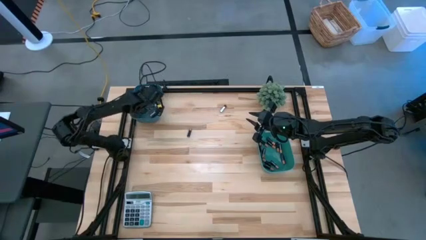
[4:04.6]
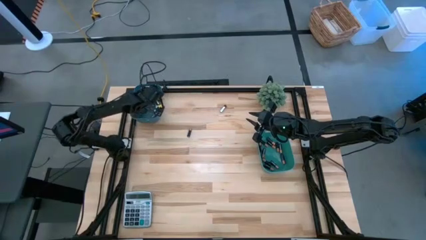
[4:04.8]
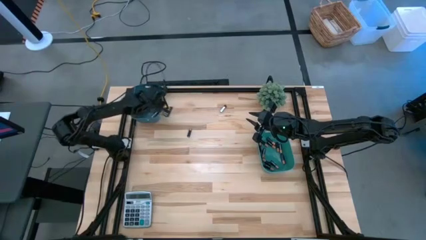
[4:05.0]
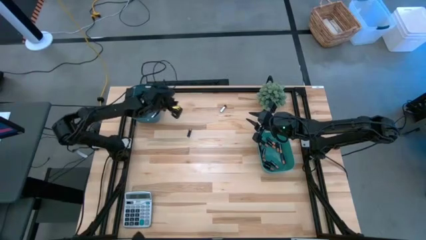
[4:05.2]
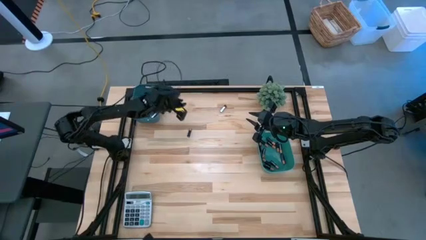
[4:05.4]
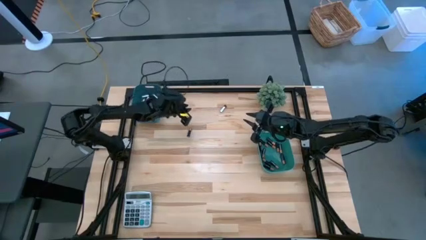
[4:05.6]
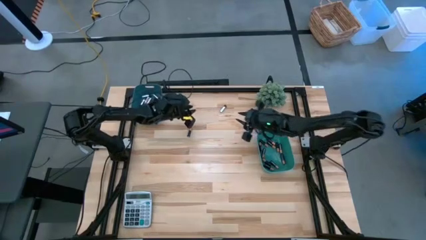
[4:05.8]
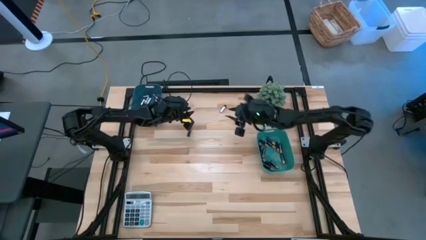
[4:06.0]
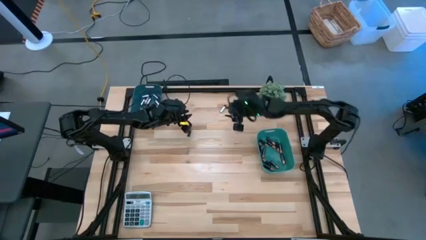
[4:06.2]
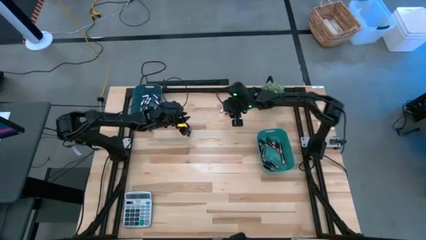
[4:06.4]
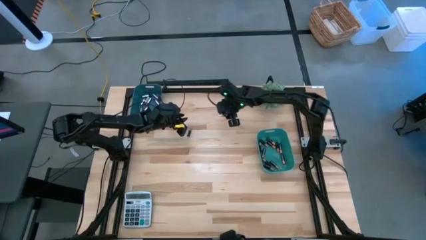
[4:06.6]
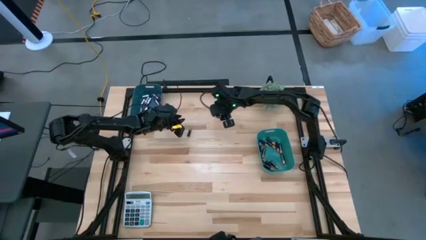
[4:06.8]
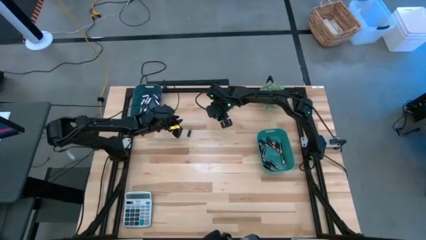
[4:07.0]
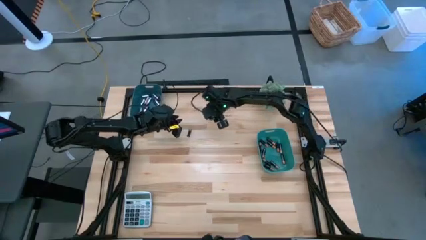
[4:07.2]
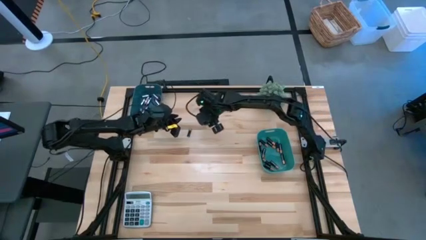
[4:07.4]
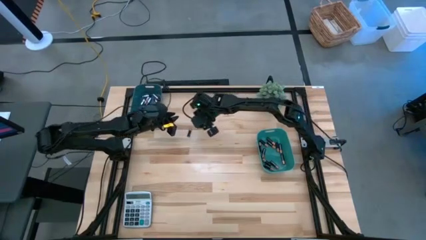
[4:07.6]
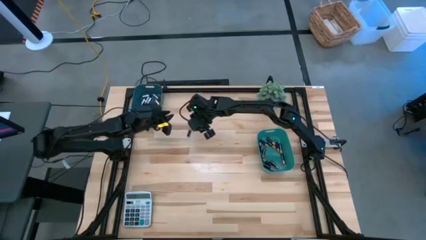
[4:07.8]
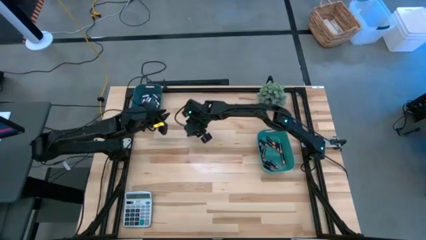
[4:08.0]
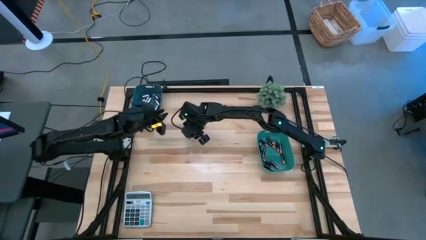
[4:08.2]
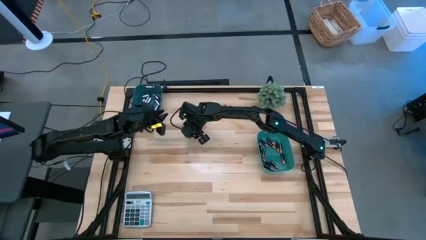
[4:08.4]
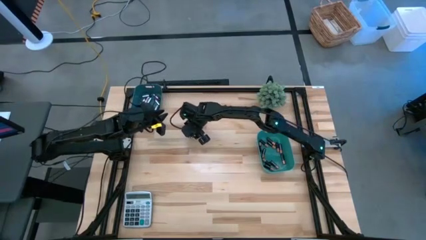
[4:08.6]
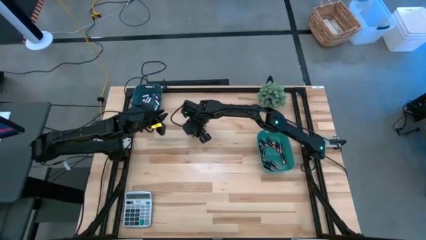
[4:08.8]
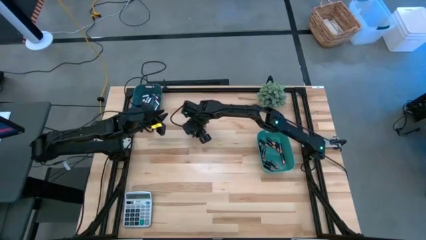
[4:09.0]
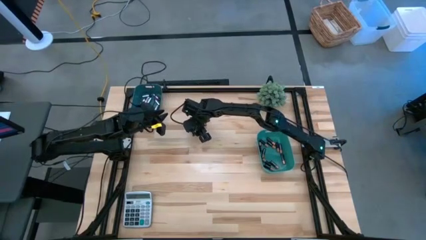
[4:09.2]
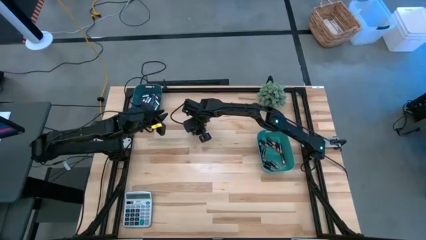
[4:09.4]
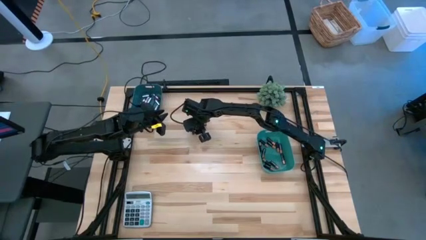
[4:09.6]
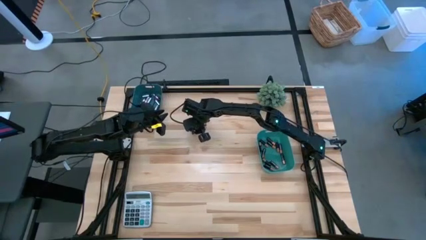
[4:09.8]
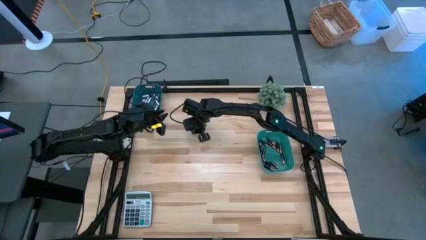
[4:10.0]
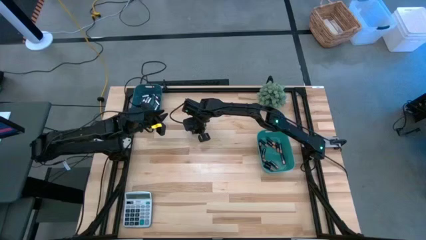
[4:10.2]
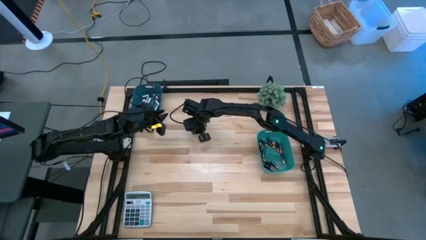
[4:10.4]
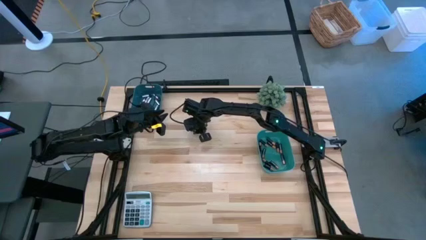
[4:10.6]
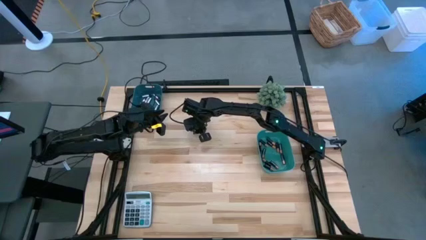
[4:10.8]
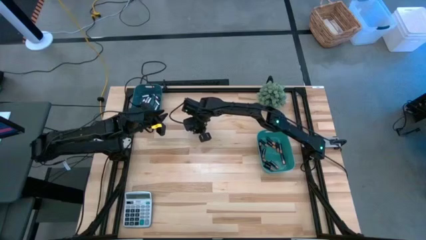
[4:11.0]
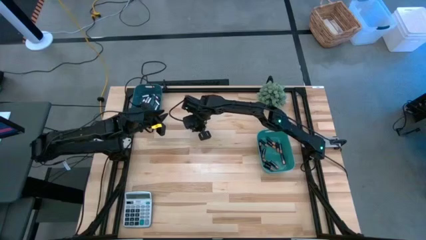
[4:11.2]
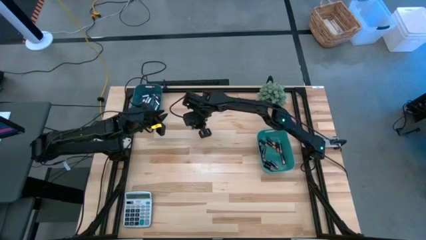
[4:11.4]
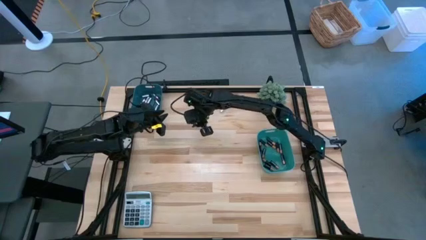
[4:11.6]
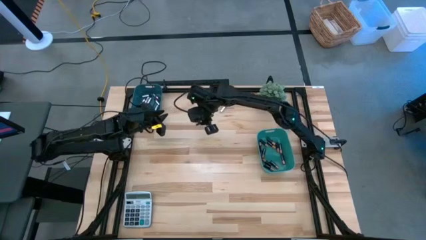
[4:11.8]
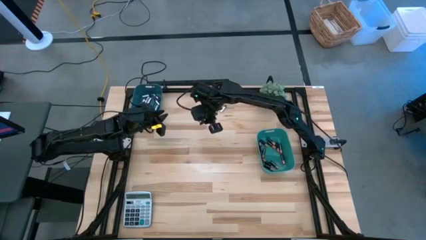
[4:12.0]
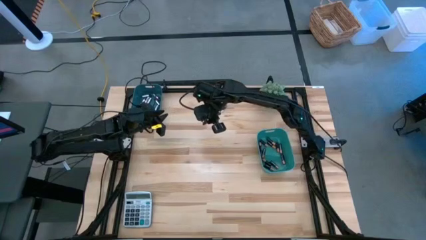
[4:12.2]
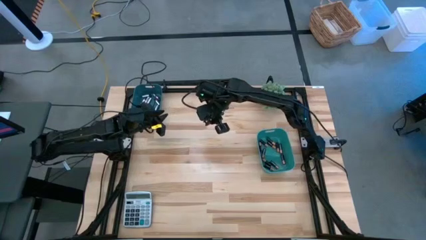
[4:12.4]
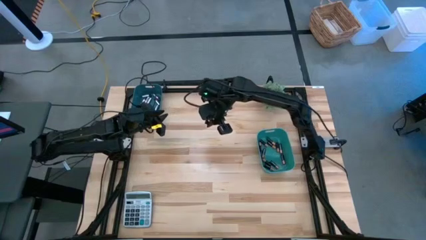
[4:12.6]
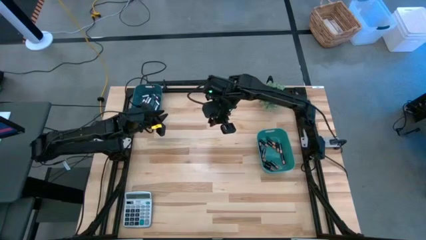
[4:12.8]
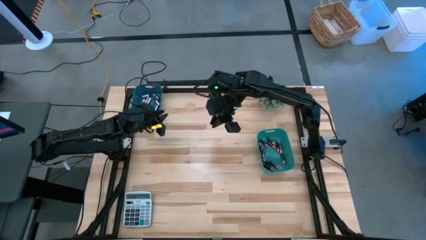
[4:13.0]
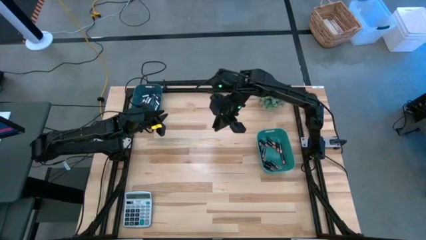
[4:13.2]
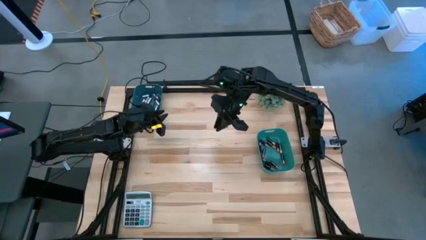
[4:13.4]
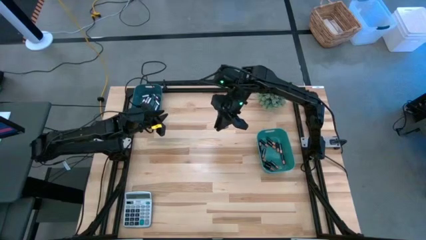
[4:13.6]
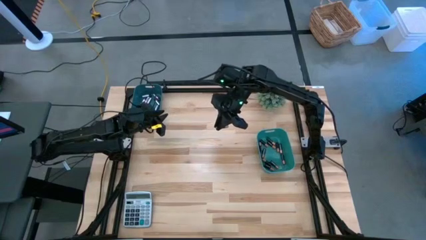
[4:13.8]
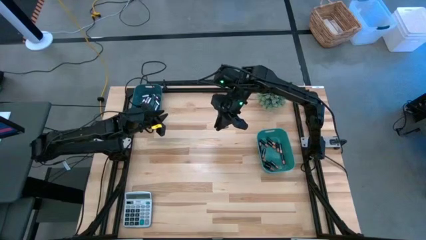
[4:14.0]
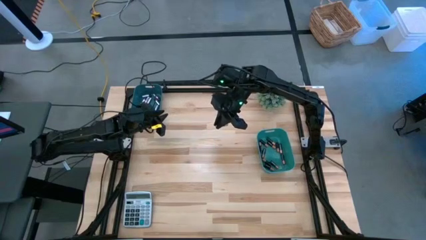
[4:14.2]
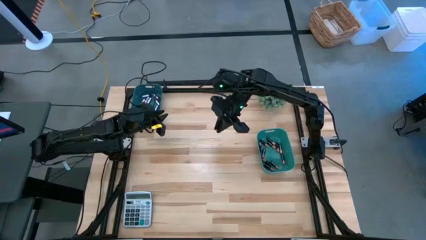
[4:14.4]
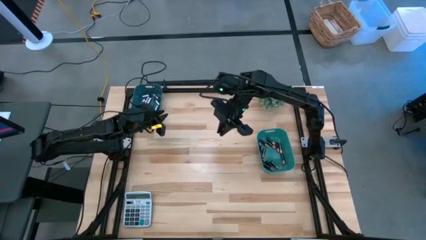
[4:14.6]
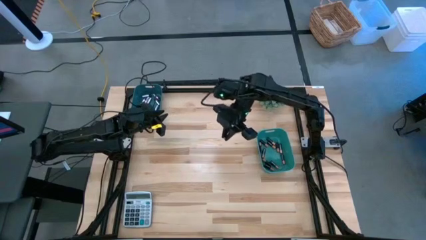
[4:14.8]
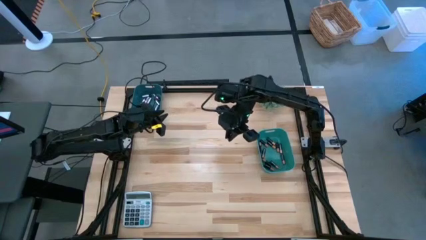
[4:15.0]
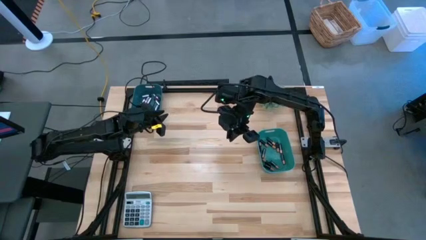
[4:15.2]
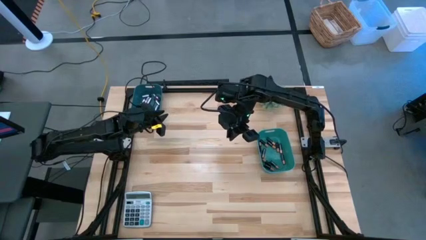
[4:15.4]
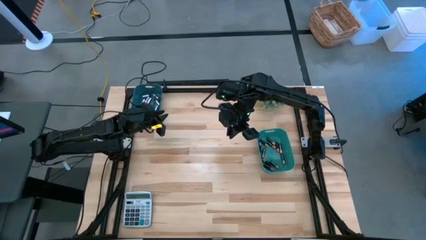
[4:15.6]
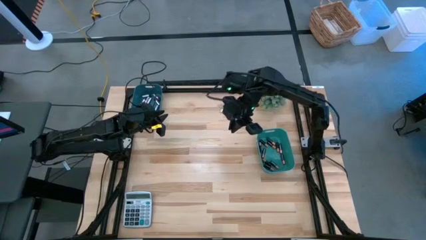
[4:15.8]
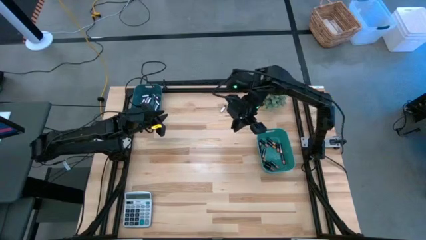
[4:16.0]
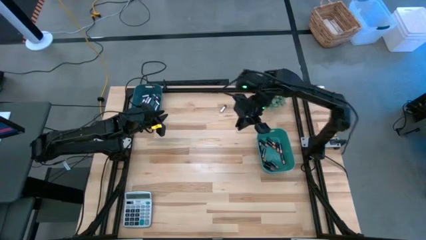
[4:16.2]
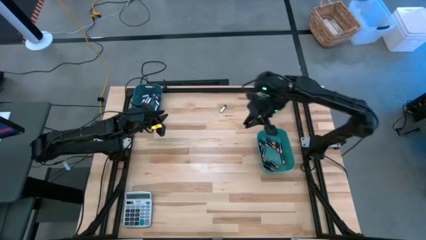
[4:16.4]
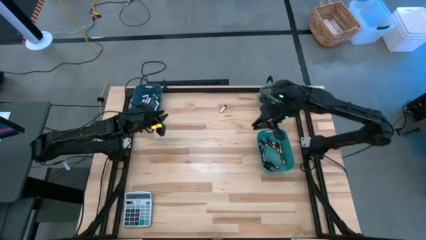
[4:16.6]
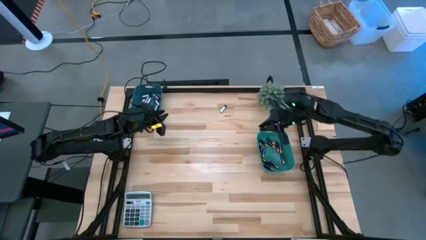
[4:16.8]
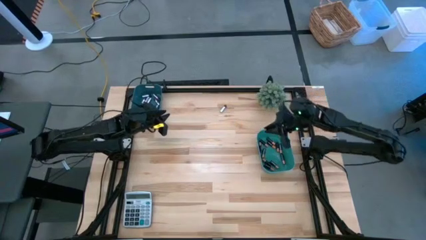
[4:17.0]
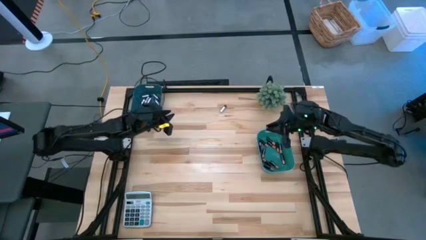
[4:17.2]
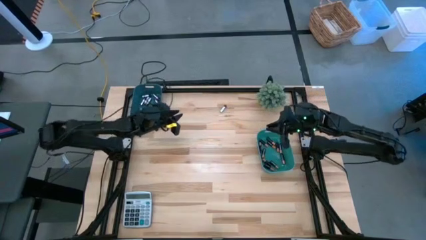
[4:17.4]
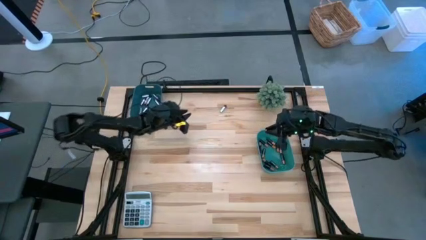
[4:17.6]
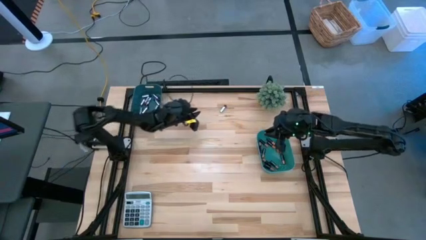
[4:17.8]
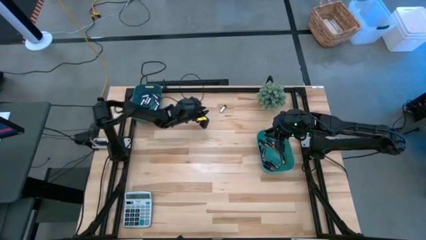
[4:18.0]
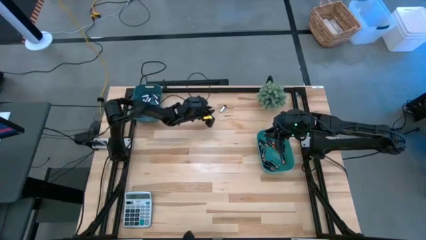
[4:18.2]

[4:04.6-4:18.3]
Task: Sort batteries
Put the brown-block battery into the green bin
